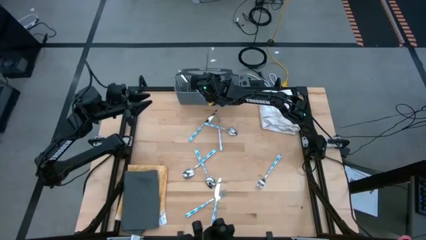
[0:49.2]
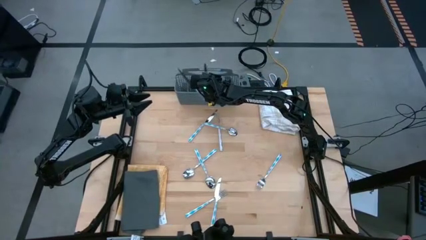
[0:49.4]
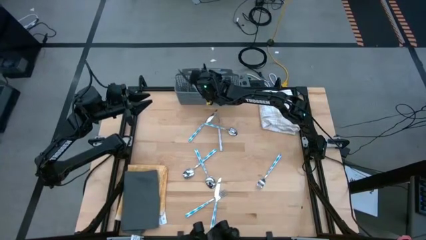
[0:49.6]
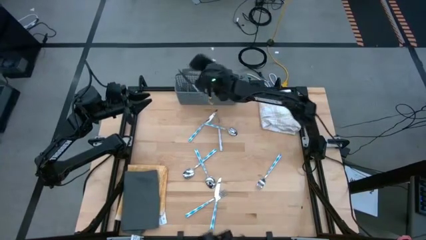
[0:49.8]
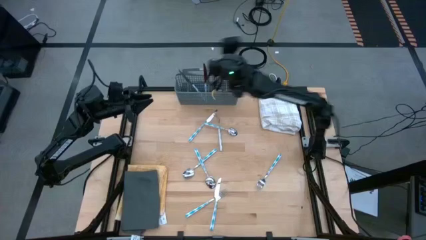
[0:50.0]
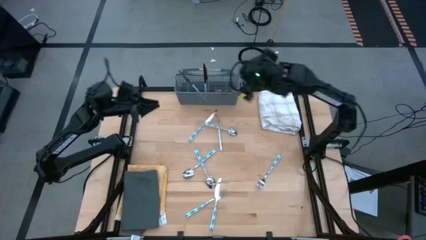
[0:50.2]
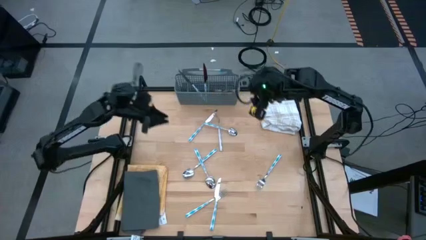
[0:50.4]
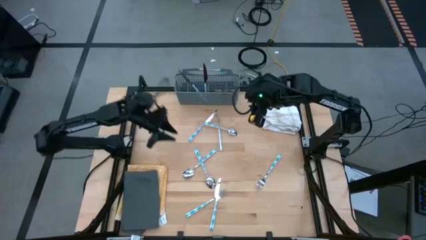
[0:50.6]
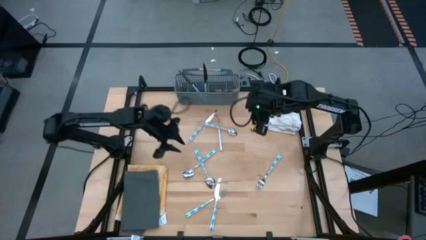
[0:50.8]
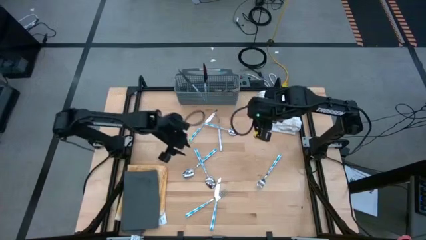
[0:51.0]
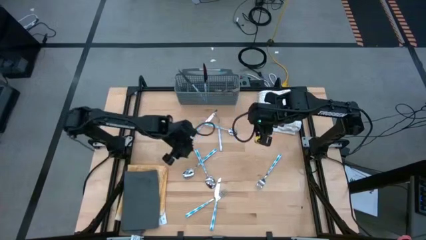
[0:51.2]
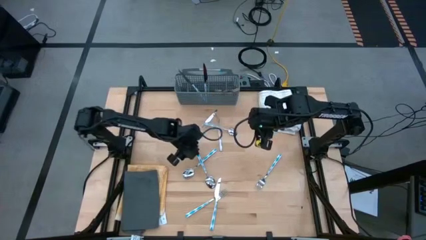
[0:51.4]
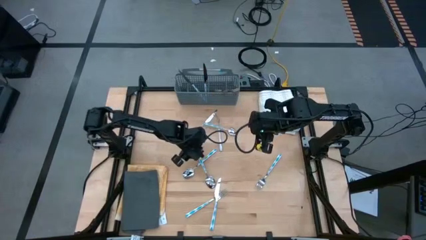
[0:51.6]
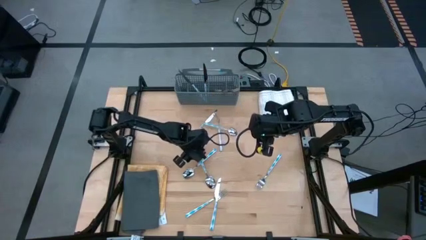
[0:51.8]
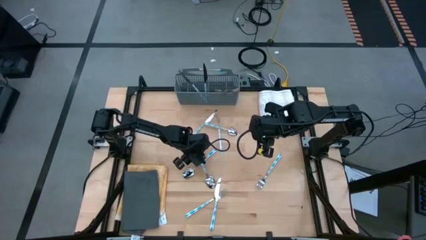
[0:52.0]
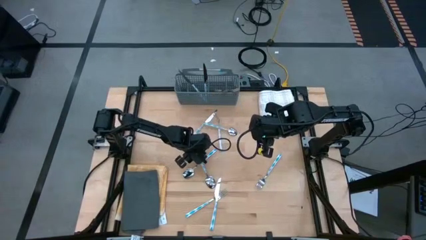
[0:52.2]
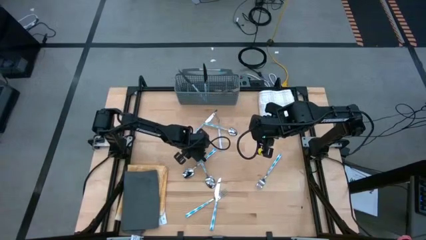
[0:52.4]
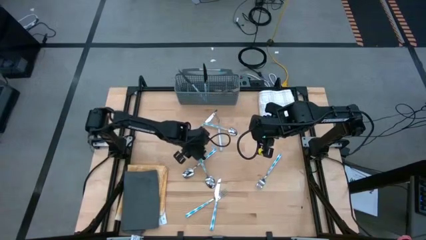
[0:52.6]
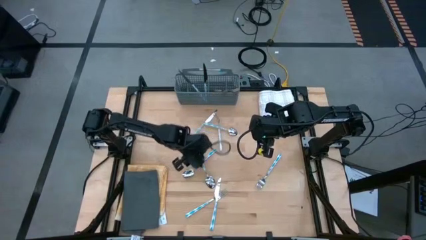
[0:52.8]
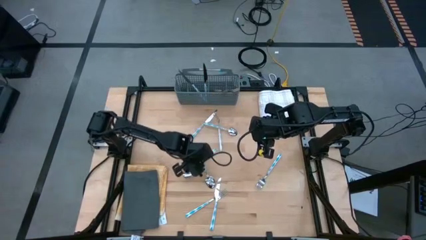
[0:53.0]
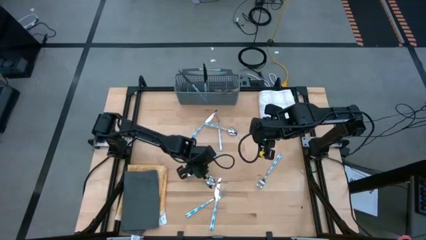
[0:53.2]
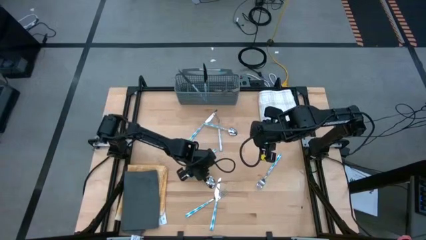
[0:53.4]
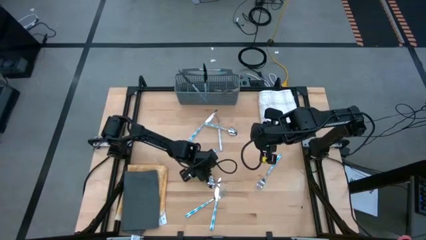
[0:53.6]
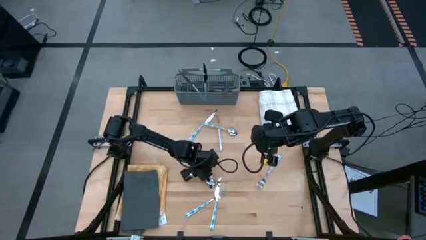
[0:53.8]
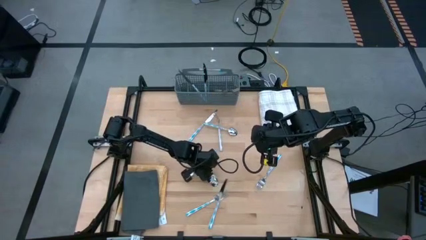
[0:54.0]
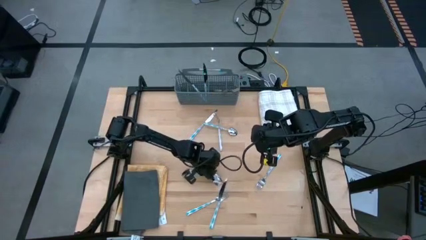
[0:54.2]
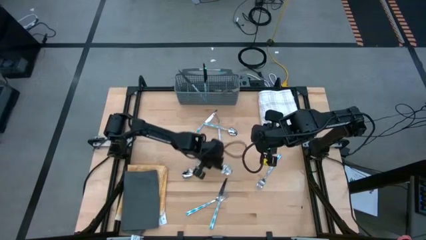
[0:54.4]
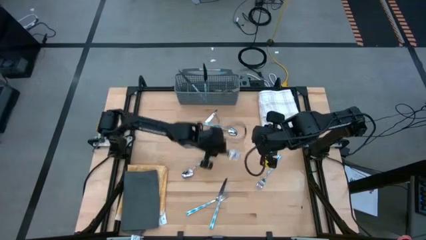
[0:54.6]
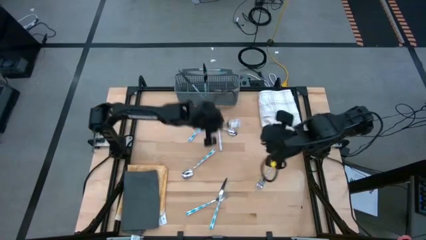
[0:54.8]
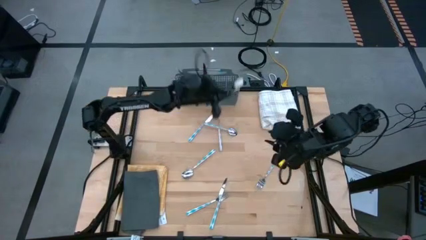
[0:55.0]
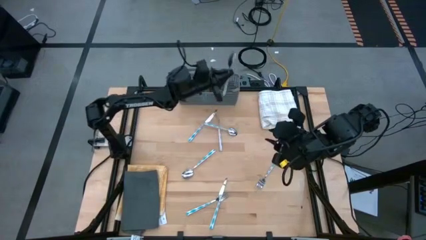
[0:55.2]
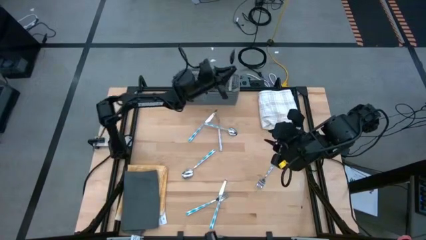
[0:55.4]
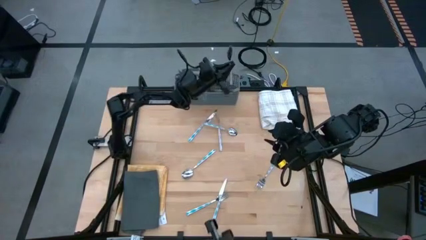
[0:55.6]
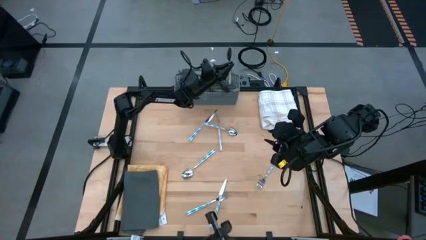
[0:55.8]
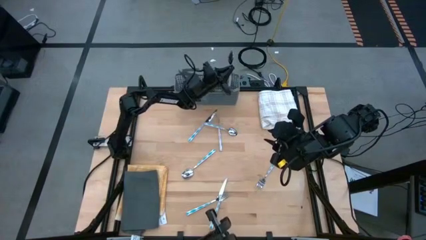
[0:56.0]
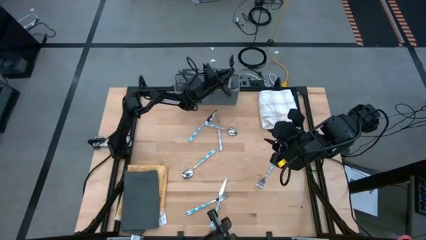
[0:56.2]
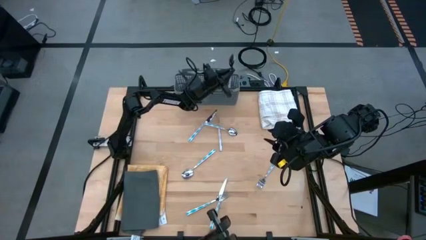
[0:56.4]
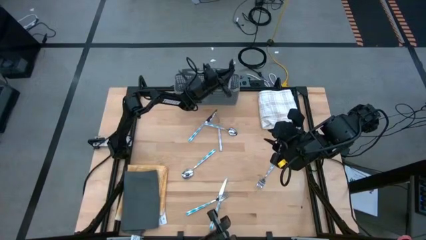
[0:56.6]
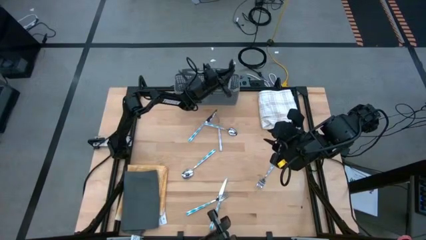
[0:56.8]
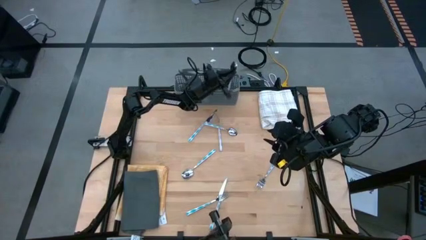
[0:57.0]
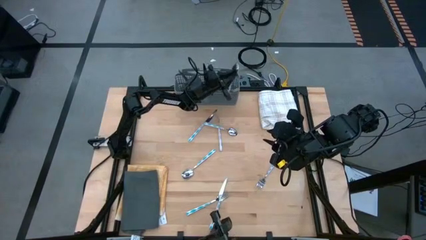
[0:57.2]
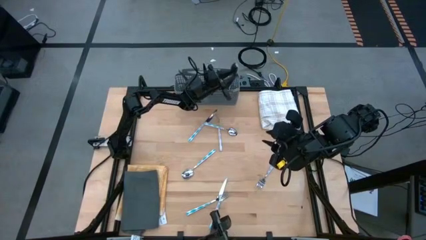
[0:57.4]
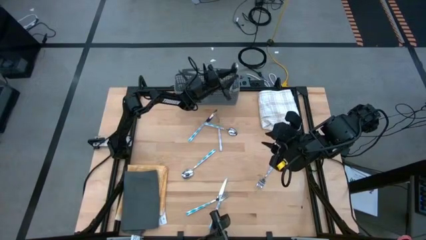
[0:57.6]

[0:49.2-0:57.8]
Task: Sort silverware
Put the blue spoon into the gray silverware rack

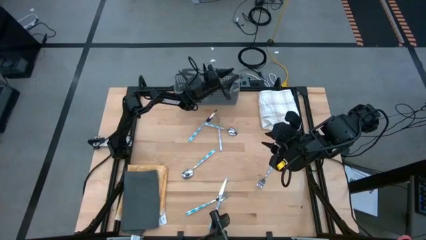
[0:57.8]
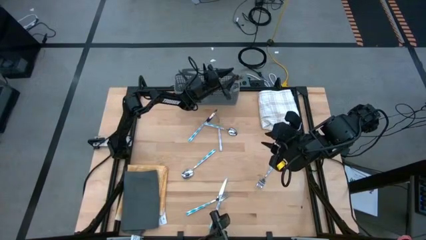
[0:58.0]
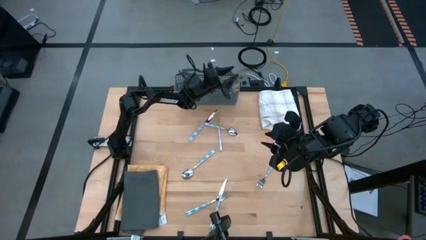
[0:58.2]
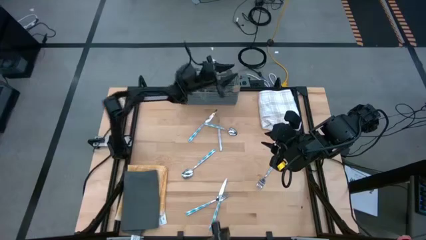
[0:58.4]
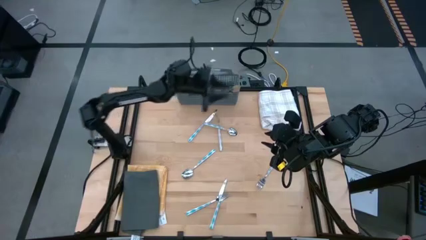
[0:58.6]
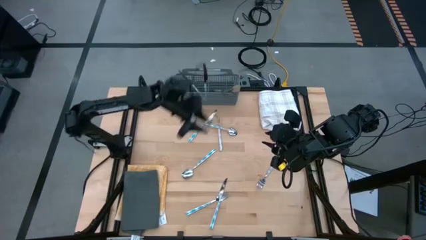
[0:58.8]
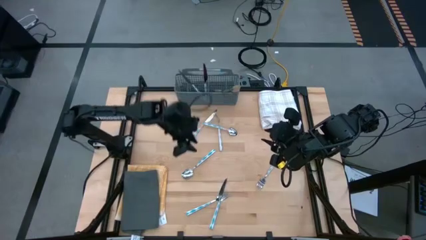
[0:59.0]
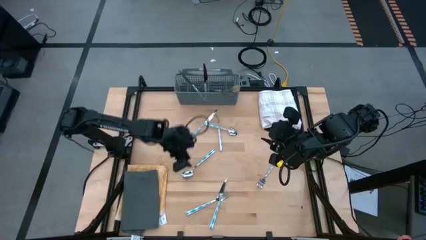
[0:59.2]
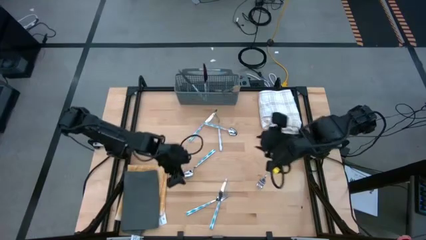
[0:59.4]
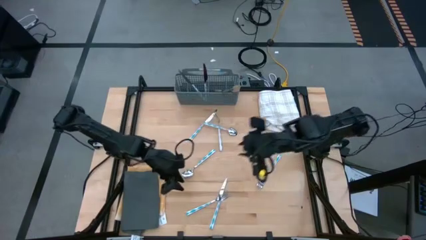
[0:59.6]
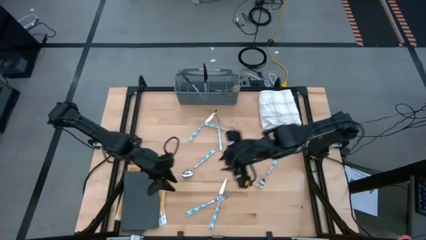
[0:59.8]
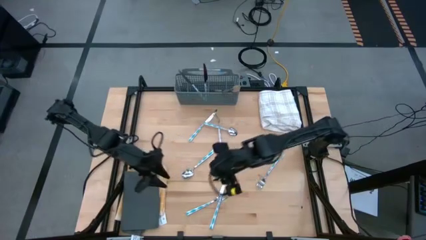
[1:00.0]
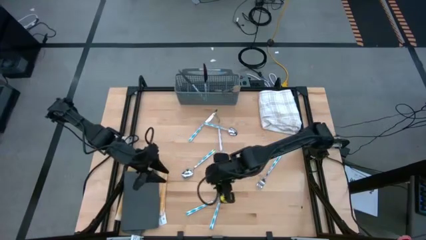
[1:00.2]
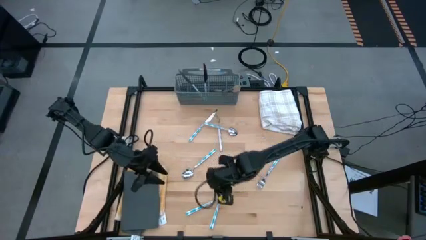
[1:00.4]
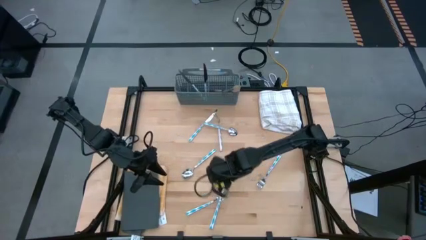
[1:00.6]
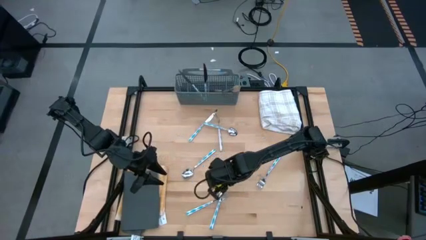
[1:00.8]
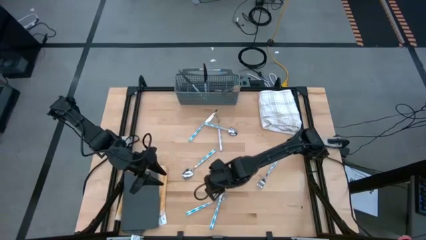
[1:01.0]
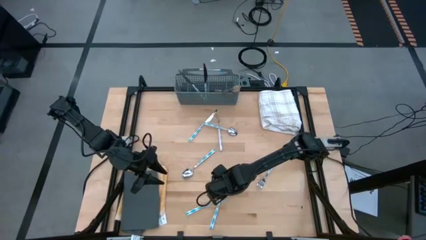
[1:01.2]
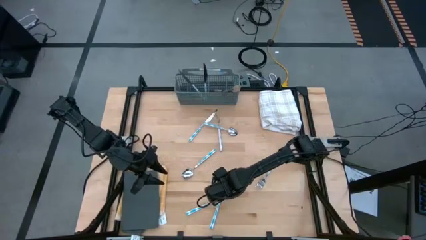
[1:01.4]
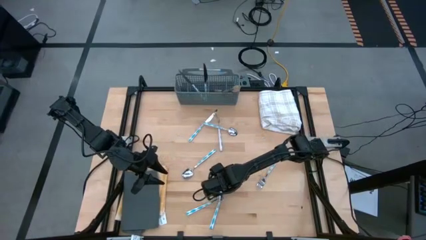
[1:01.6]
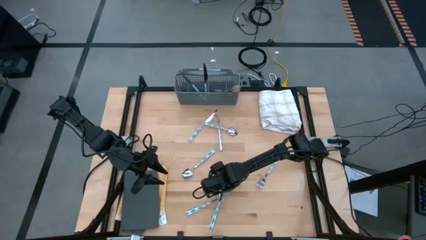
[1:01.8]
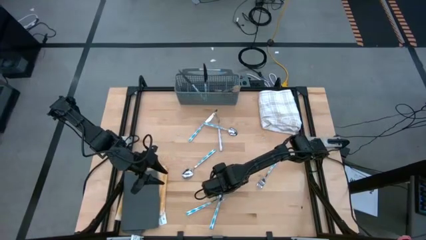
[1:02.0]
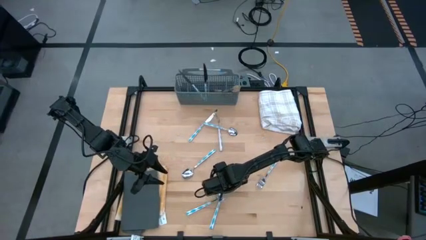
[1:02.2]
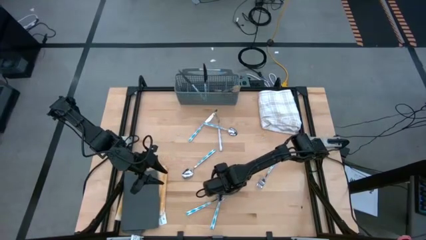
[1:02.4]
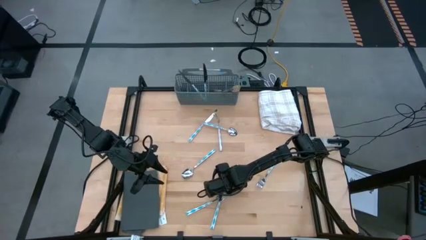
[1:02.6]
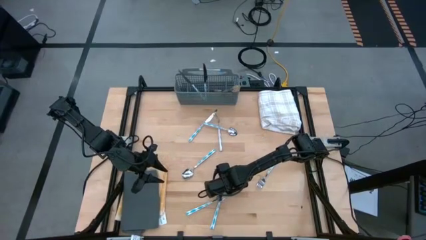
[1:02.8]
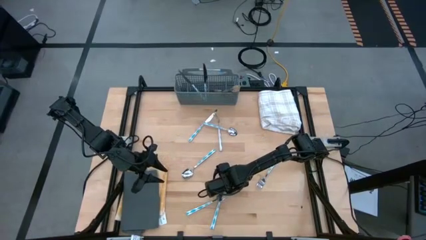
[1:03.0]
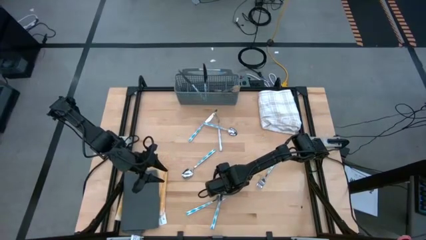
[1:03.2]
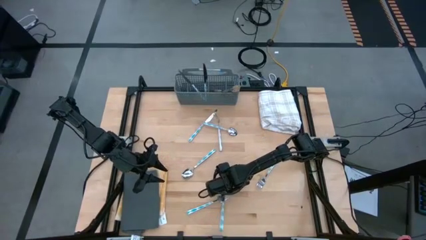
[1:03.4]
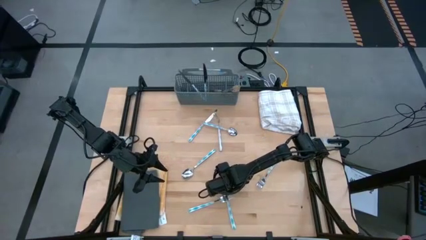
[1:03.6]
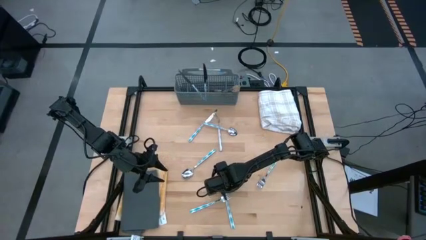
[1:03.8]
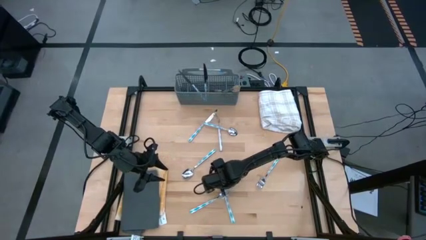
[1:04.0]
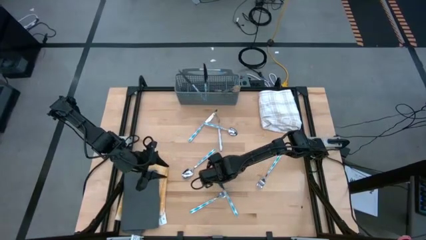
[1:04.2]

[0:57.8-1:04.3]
Put the blue table knife into the gray silverware rack
